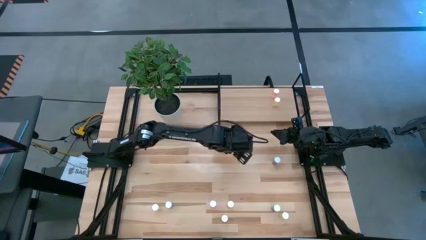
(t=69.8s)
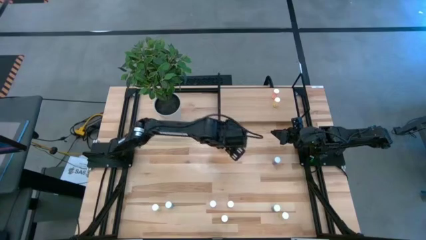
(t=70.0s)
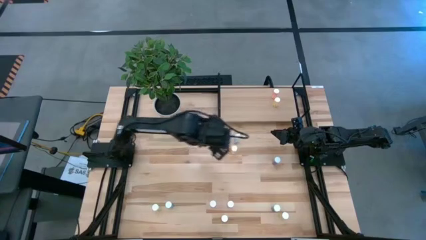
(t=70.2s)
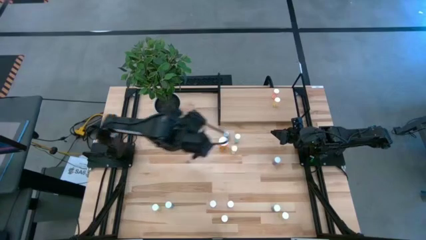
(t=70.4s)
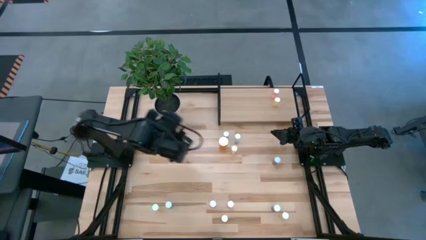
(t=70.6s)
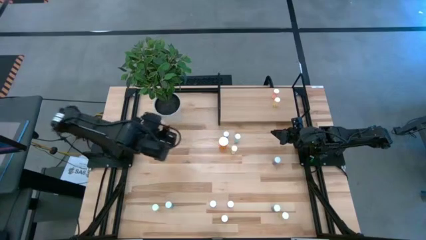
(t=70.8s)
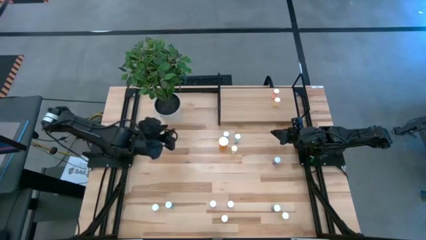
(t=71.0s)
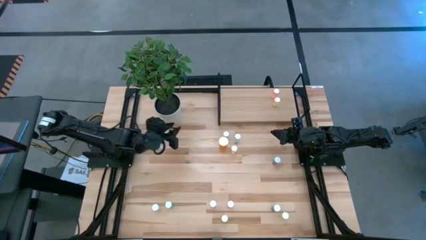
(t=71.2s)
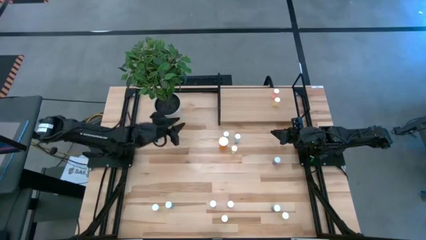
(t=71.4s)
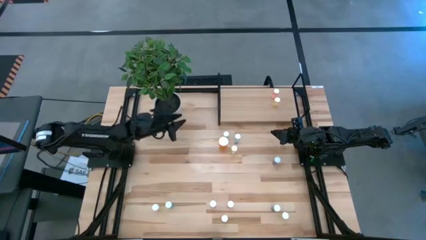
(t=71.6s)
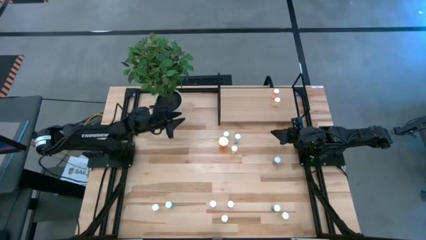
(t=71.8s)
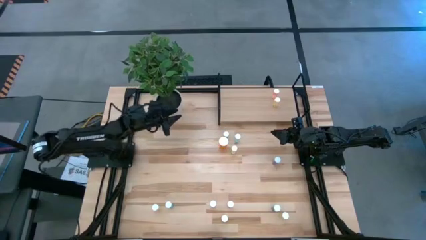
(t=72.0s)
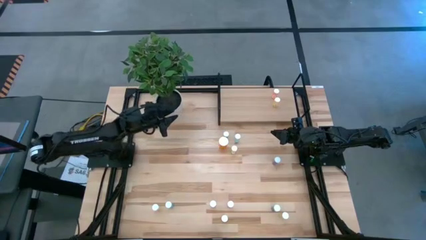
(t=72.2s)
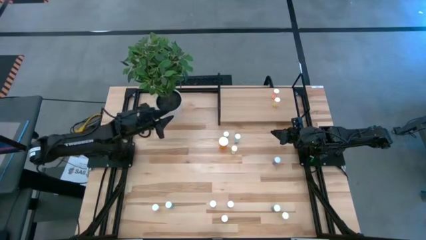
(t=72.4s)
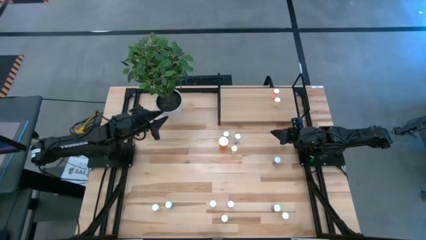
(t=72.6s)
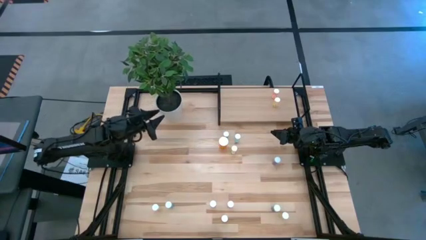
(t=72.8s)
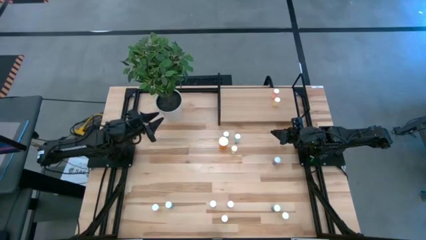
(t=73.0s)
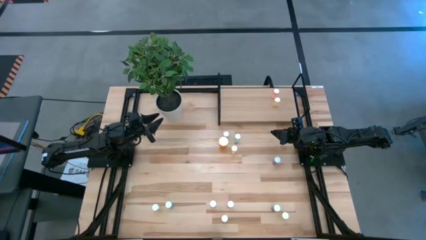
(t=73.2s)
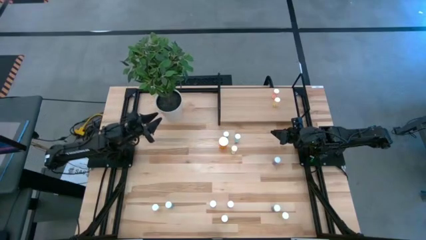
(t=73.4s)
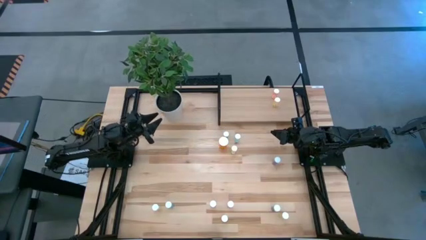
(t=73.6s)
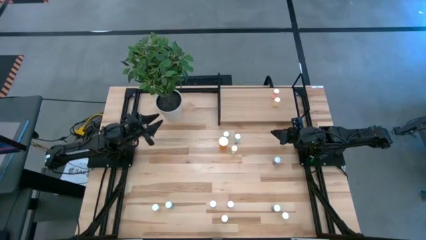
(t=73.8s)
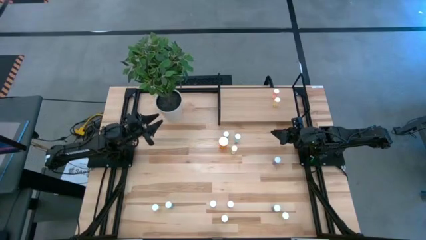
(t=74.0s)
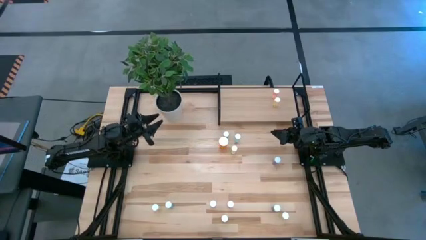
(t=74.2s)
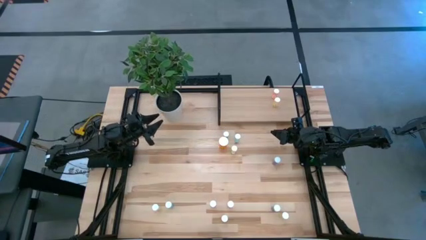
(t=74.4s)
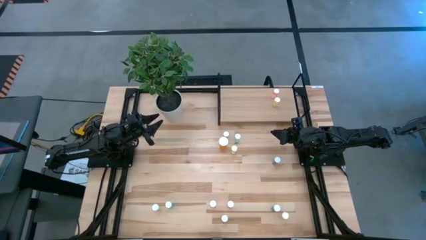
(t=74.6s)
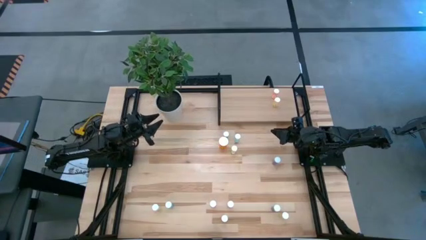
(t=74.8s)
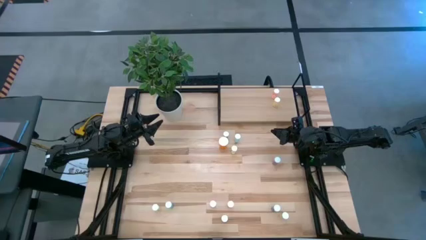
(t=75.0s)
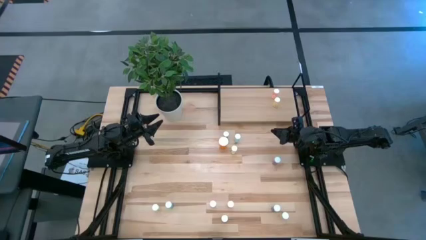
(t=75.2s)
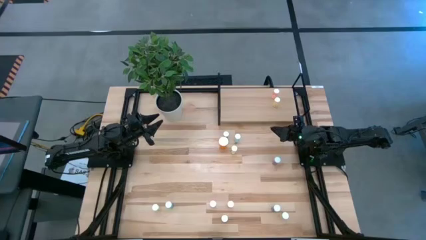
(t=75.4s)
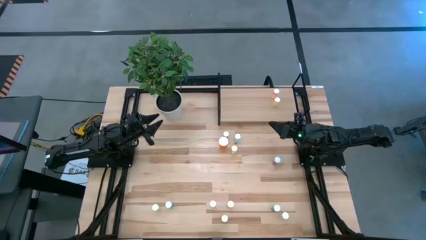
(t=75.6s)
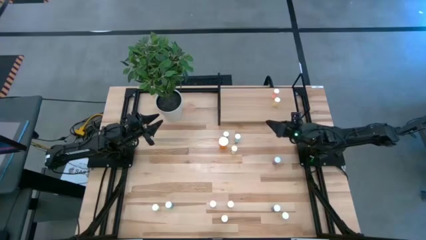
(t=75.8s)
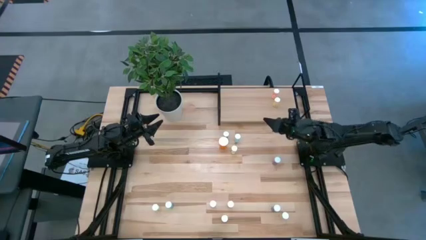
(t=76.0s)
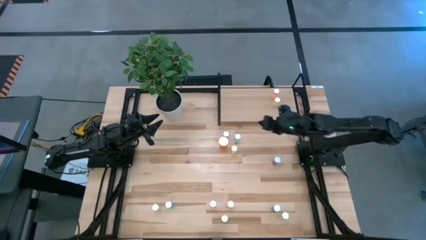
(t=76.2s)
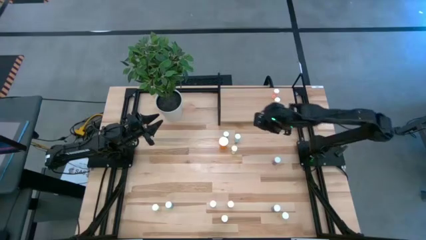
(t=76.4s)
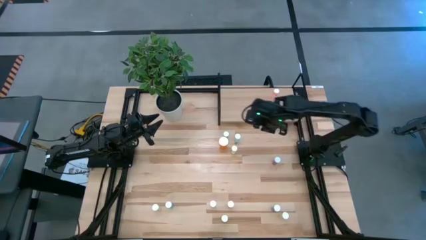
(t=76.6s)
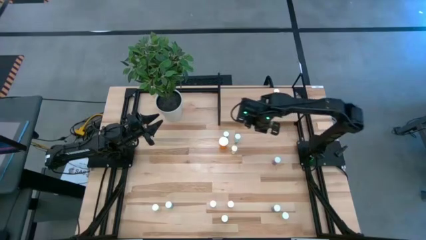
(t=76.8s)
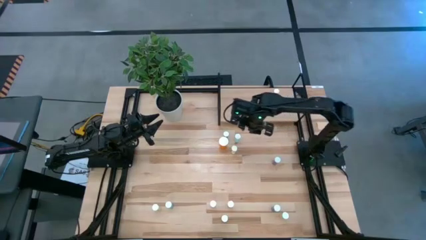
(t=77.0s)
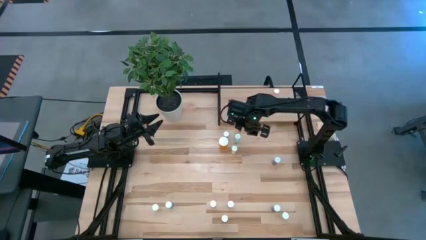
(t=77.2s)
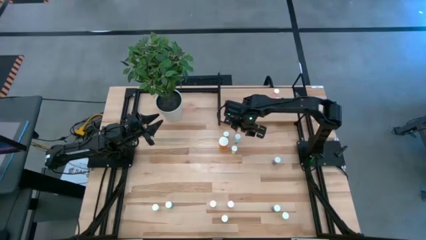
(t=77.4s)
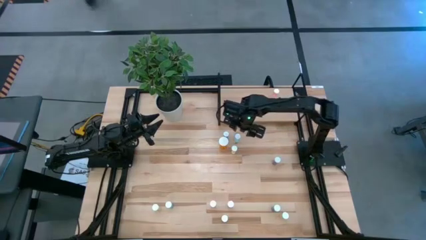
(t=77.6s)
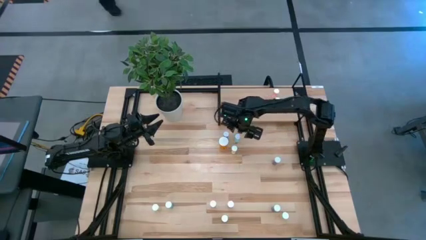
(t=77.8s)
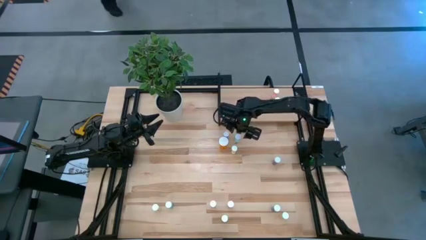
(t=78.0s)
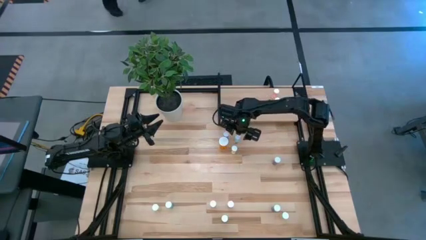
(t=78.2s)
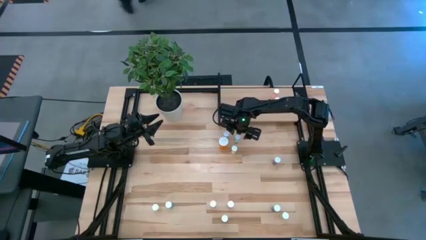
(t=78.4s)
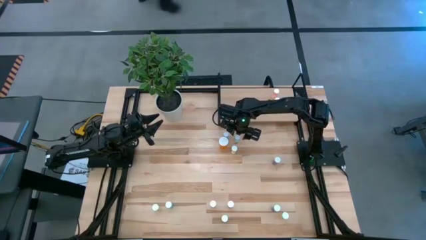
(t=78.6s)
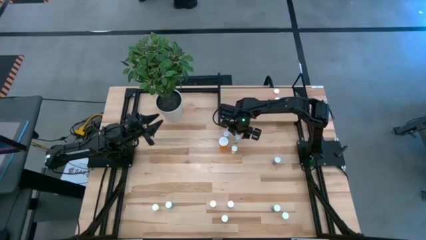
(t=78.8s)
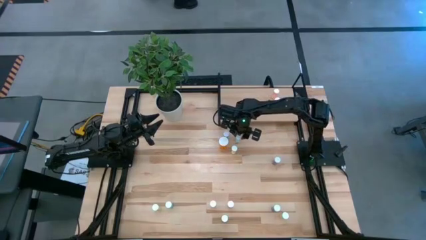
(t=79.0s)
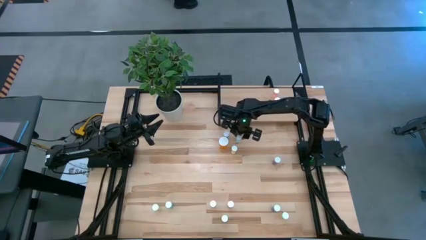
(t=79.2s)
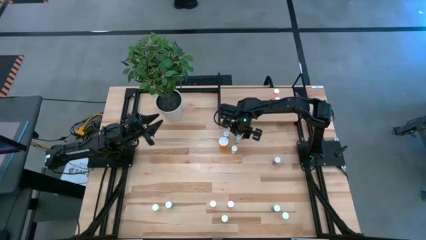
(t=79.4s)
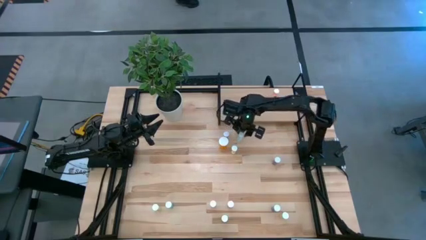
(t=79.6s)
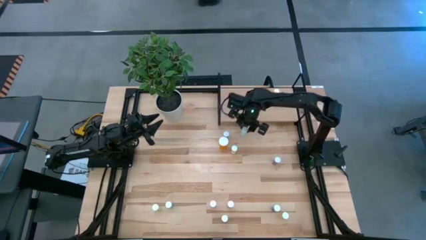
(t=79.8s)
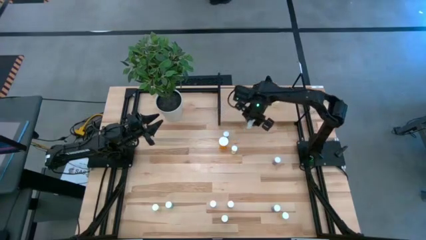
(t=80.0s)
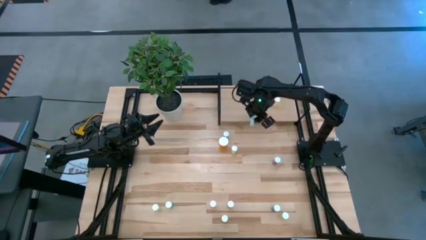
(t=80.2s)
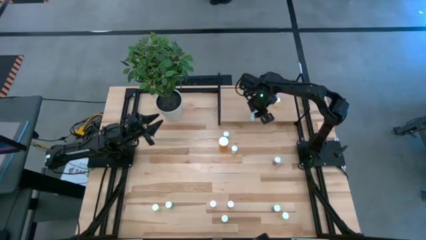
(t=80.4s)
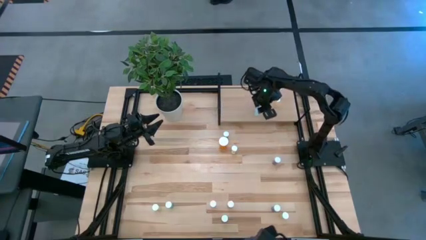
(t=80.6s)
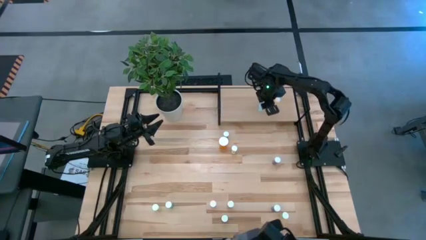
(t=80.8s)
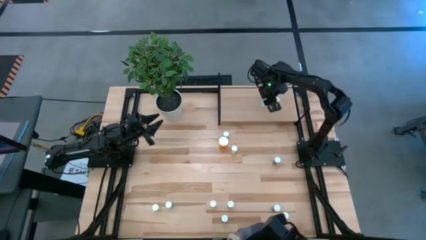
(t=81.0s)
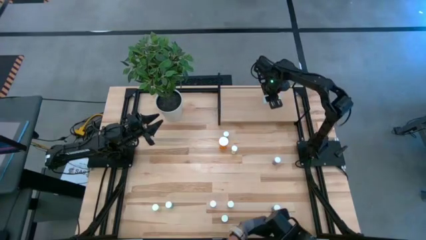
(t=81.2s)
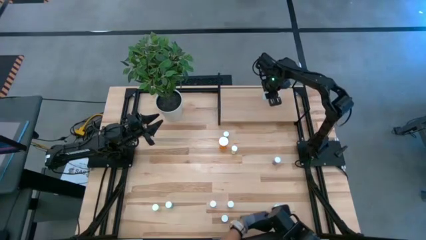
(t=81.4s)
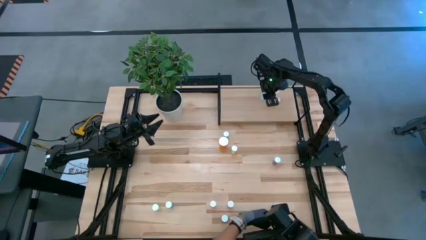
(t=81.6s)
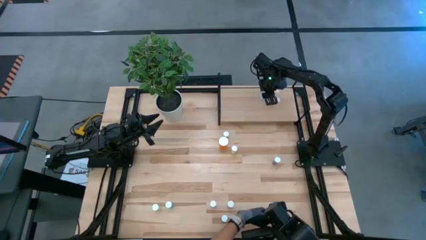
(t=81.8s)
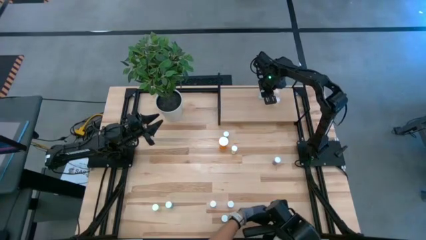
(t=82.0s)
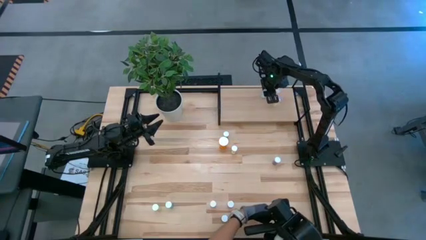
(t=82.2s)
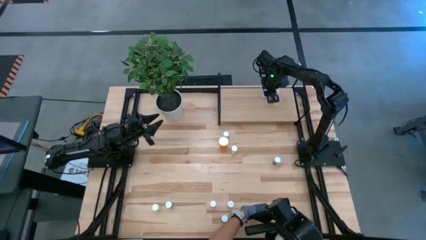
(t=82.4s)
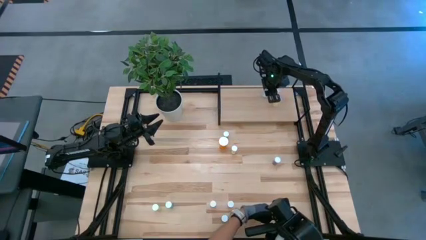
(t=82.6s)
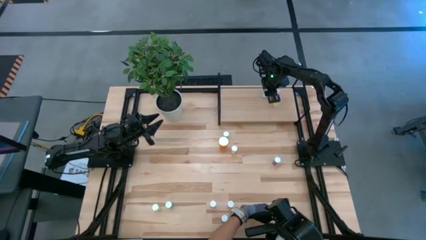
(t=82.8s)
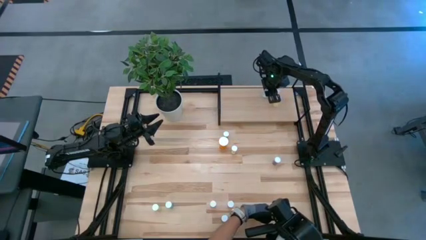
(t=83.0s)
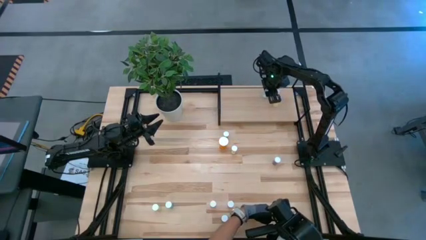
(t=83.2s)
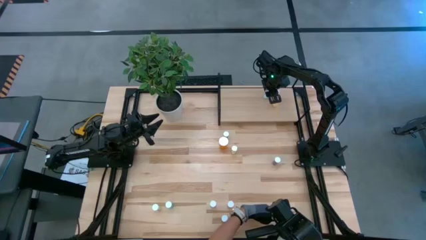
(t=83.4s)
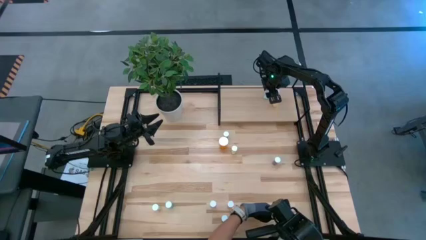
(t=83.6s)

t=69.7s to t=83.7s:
Task: Pick and place medicine bottles onto shelf by color
Put the green pill bottle on the shelf

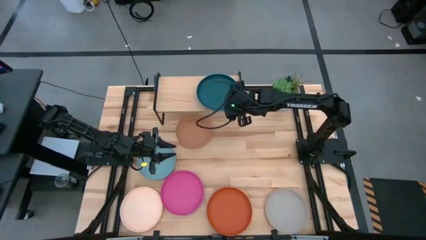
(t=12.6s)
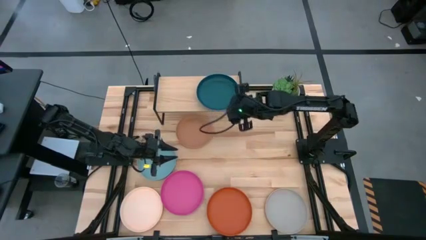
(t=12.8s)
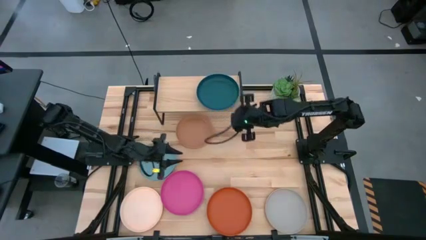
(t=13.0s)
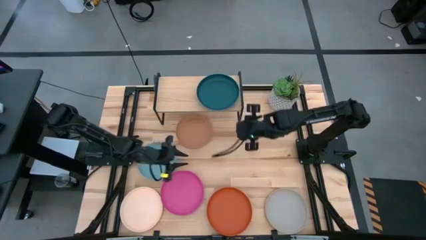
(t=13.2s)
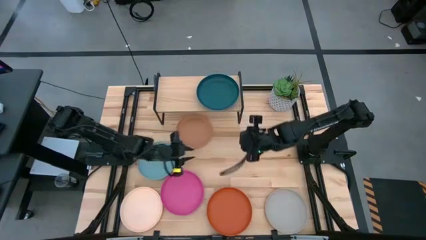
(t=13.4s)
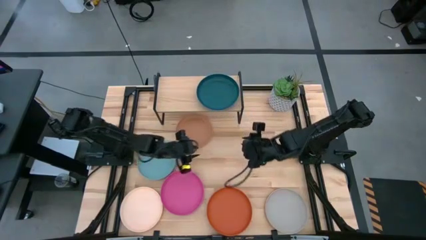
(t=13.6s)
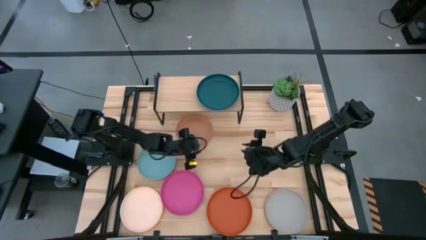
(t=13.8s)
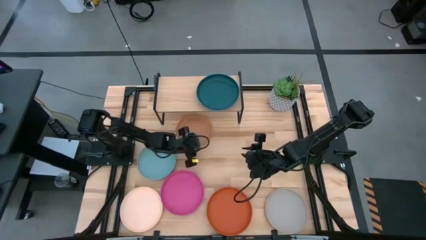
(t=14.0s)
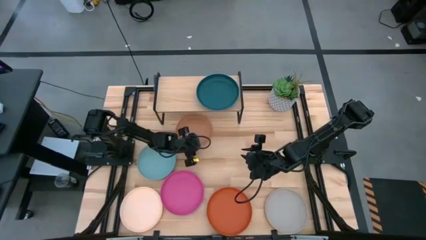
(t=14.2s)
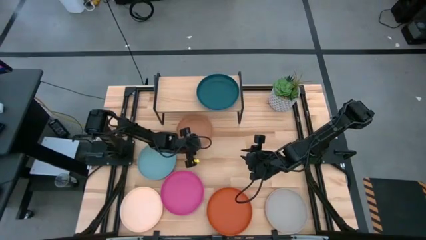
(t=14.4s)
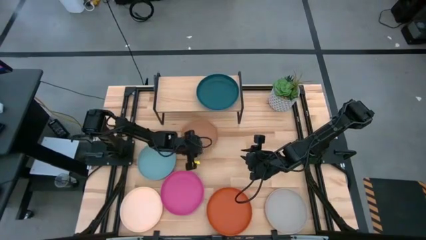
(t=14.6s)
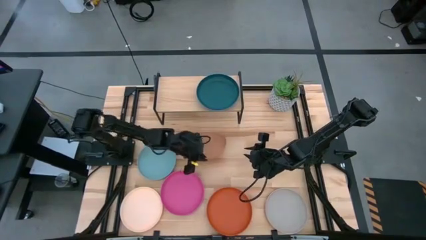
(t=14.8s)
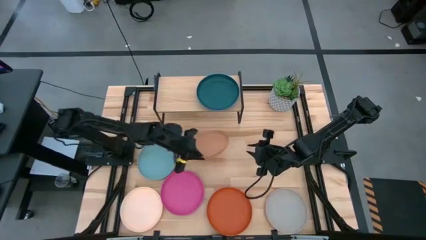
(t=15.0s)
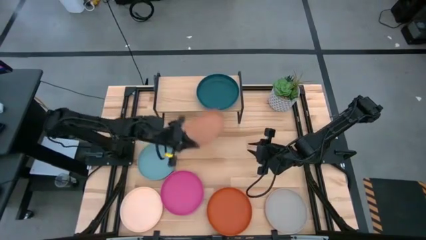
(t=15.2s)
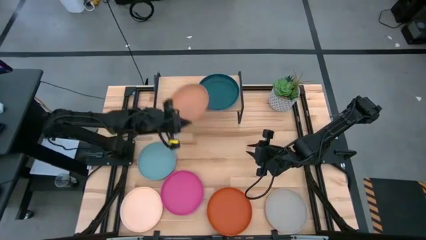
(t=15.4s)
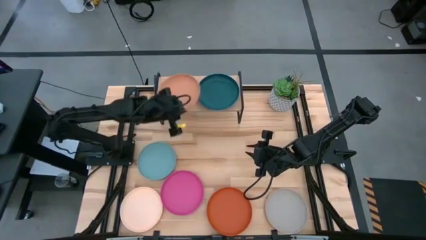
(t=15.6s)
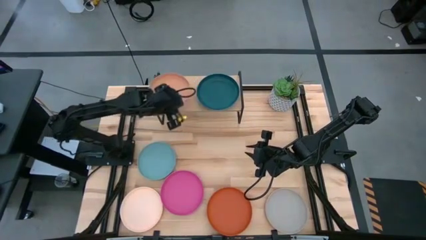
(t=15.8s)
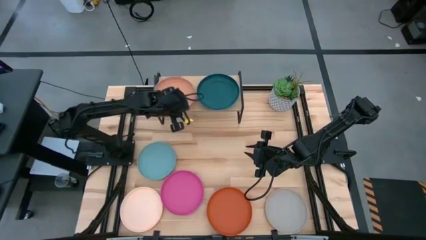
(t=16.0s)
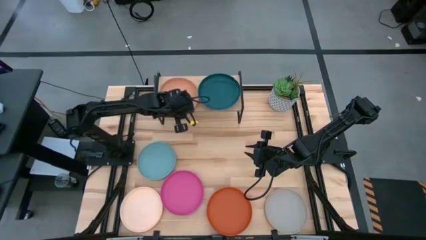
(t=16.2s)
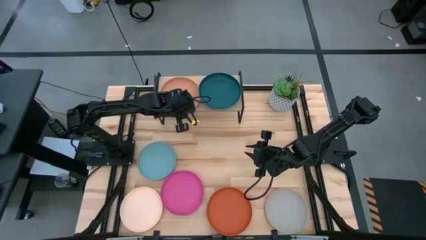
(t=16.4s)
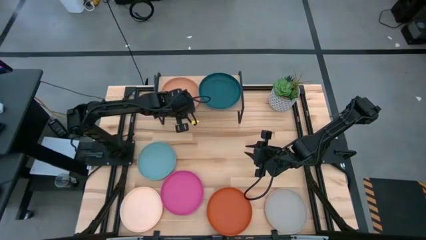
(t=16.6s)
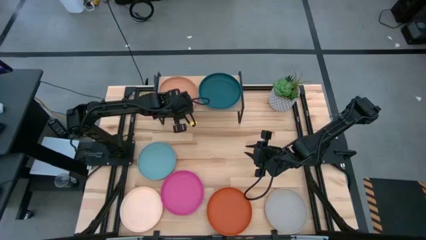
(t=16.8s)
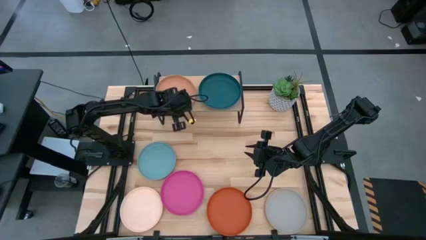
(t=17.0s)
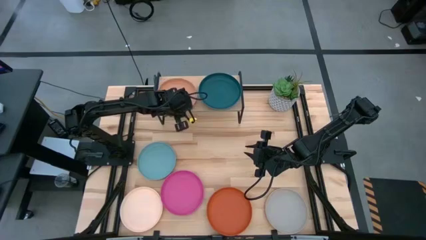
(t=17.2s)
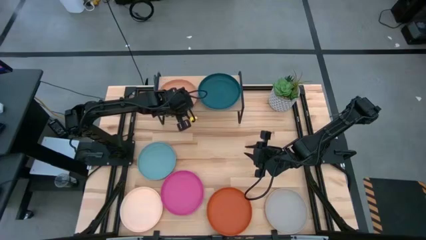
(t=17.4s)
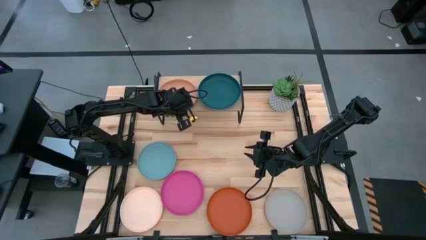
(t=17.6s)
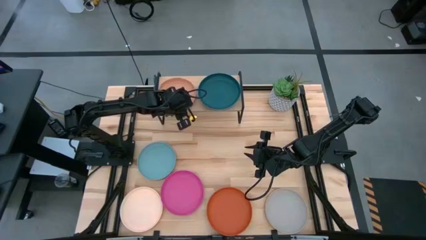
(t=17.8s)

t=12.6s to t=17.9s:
Task: Place and stack plates onto a shelf
Put the brown plate on the shelf
